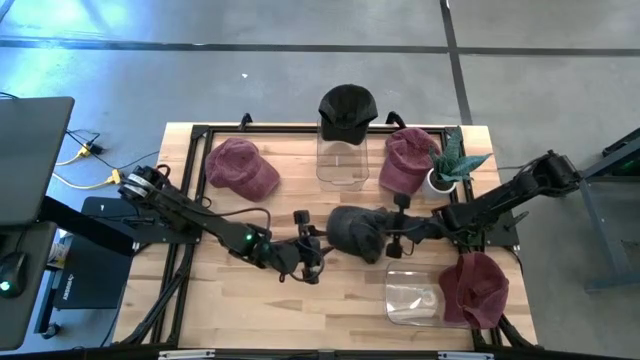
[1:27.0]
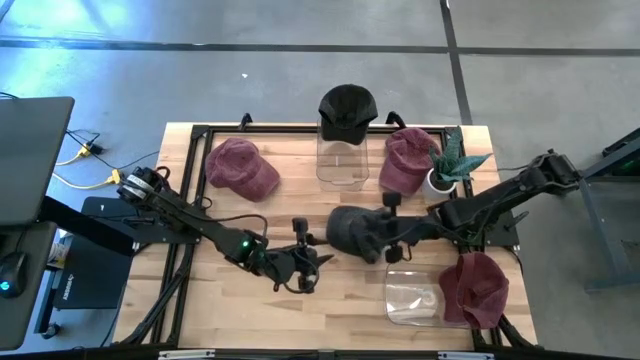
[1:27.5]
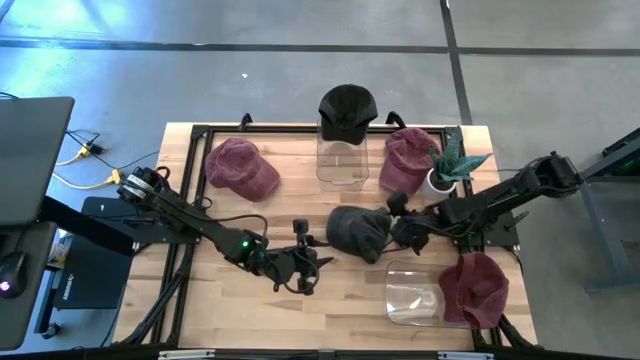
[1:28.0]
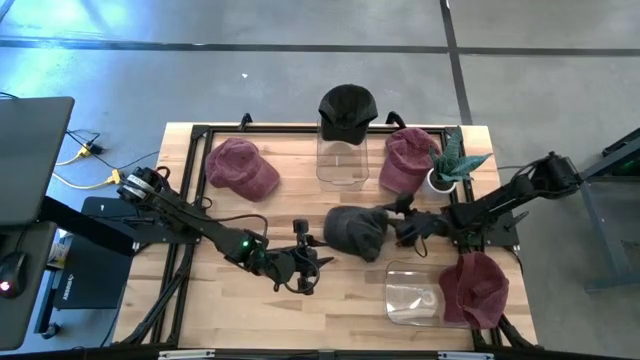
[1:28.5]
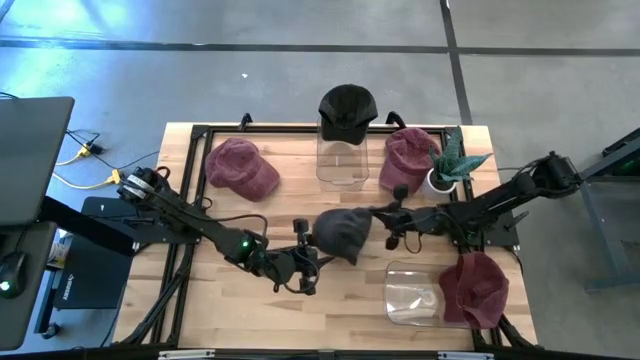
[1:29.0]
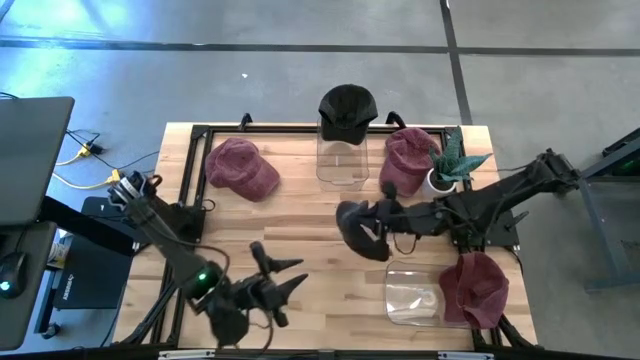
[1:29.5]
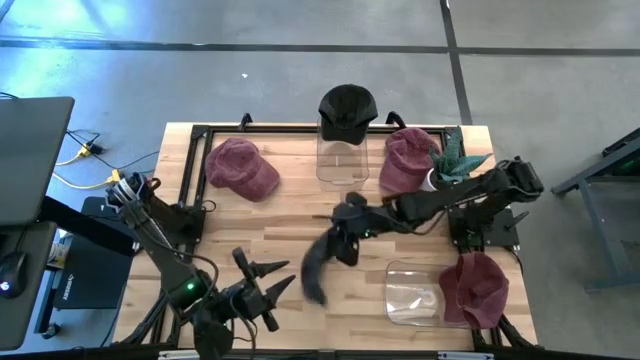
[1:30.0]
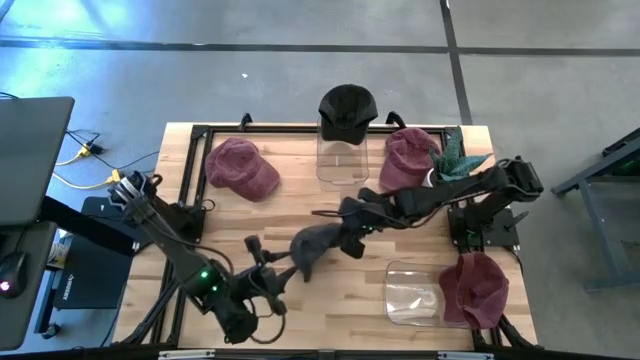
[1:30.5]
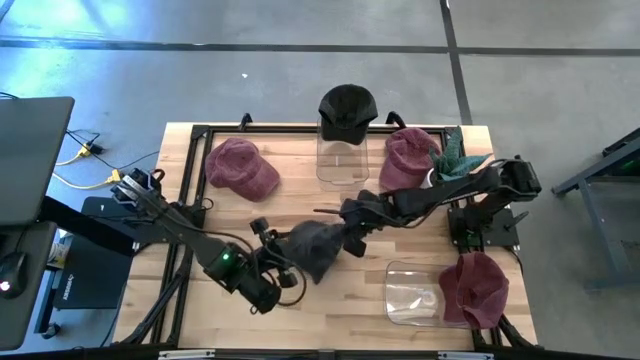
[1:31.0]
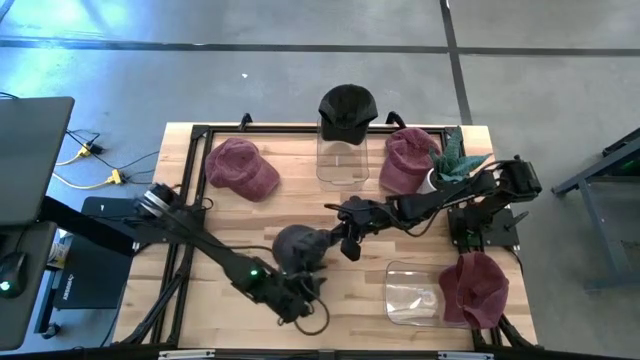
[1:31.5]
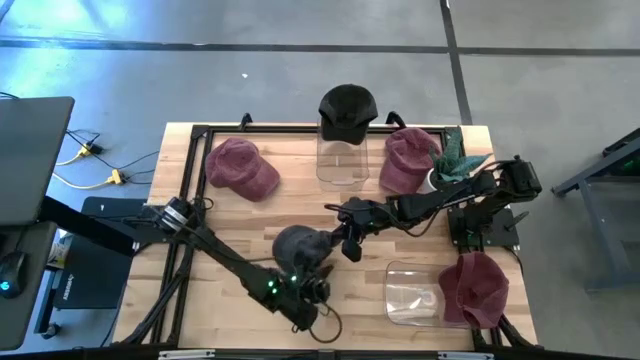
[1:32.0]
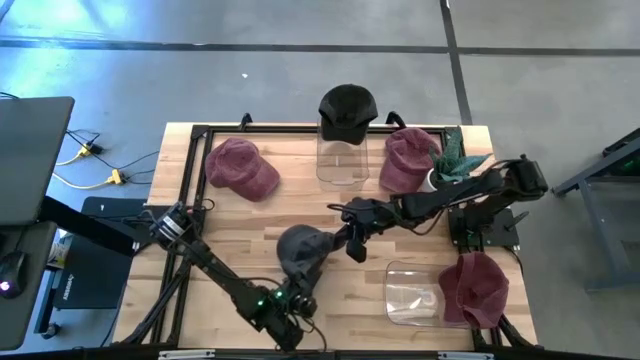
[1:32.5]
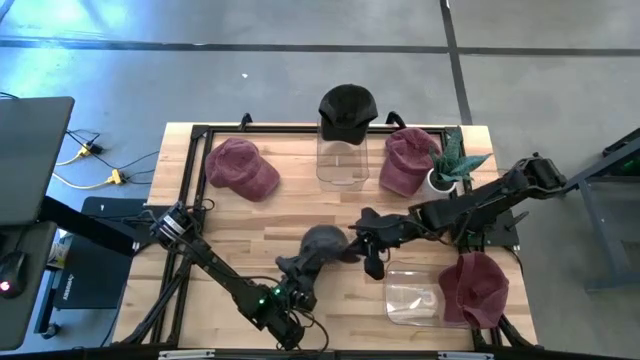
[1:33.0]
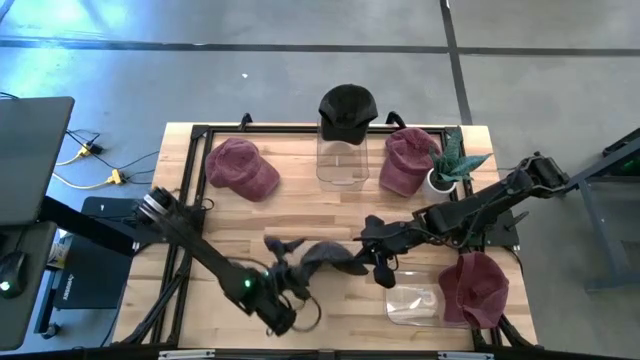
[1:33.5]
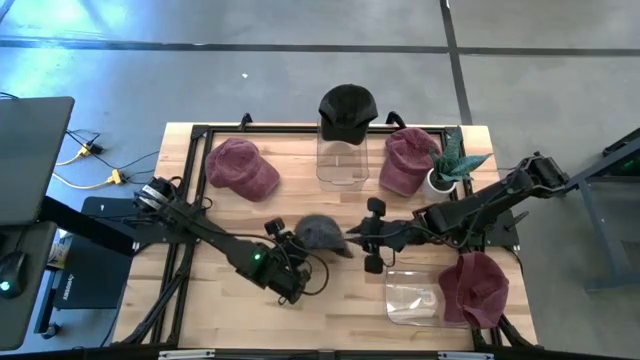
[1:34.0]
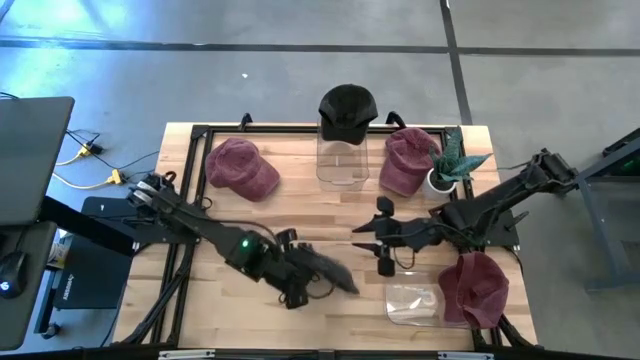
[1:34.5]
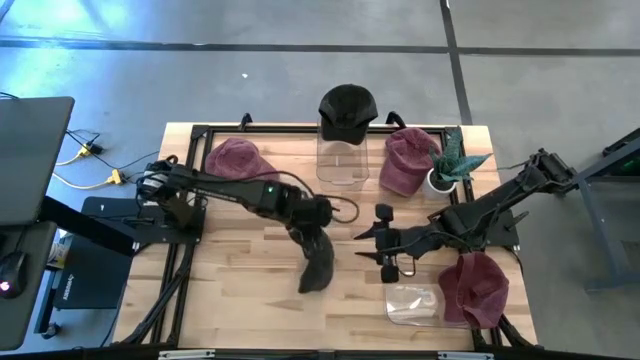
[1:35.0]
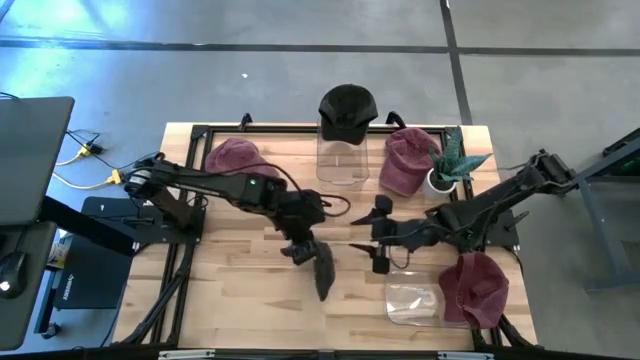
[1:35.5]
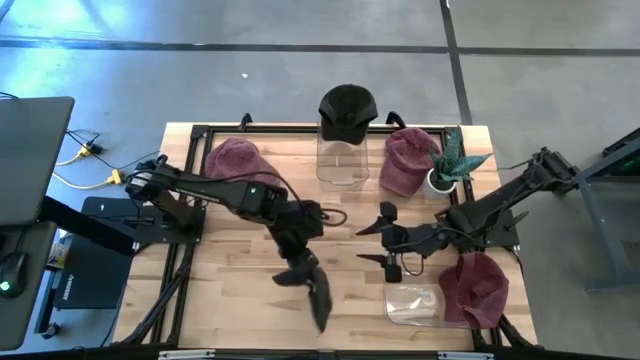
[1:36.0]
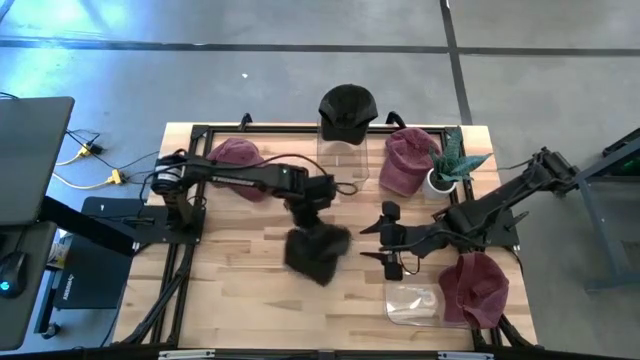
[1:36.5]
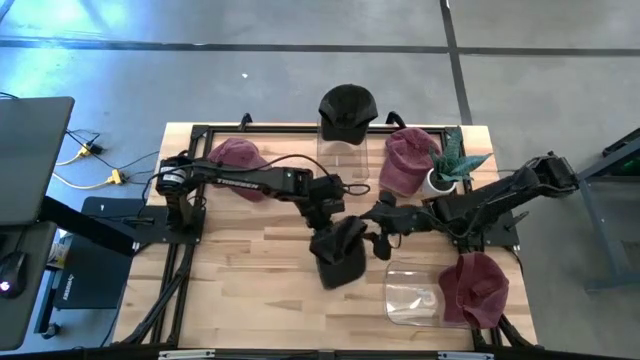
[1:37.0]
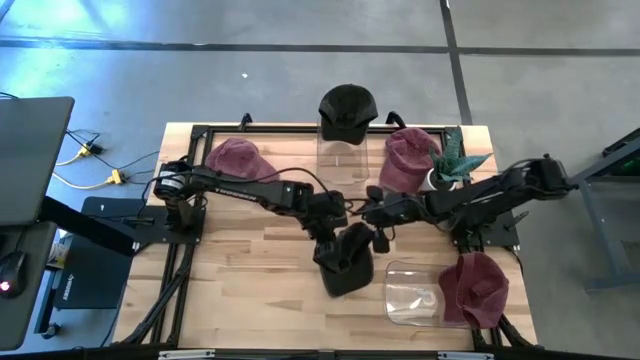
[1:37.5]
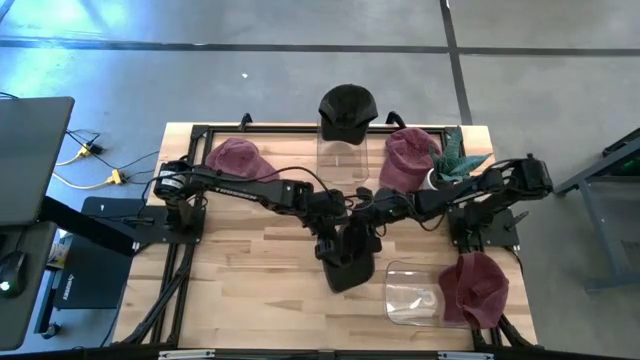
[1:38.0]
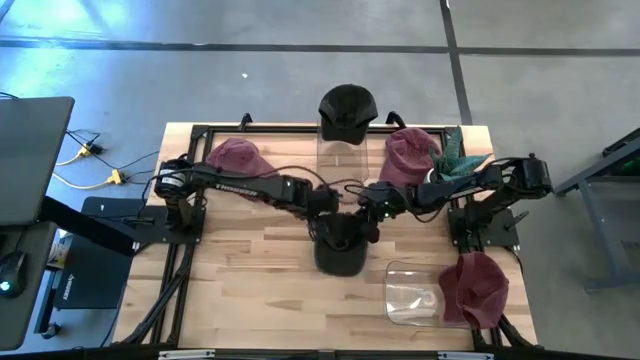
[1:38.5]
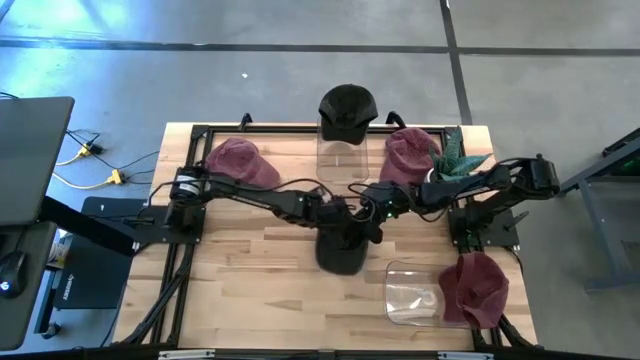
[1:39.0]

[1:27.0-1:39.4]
Task: Pick & Place hat
Put the black cap into the top transparent bin

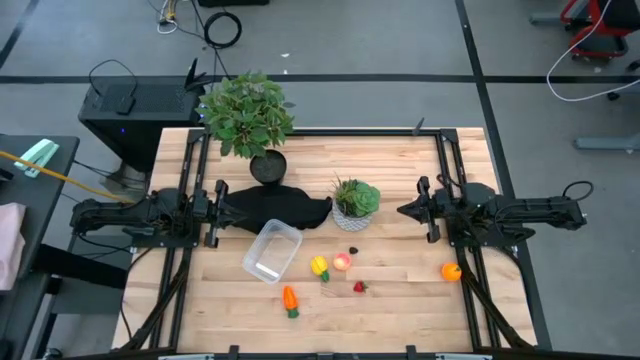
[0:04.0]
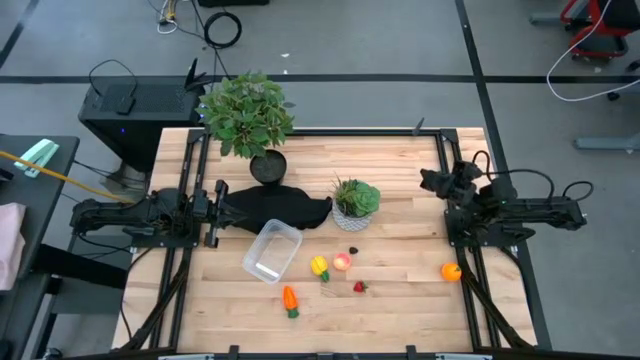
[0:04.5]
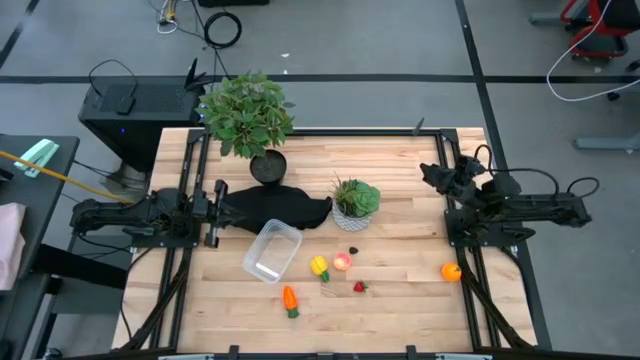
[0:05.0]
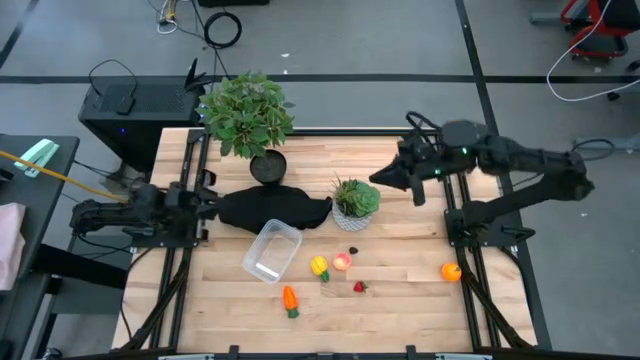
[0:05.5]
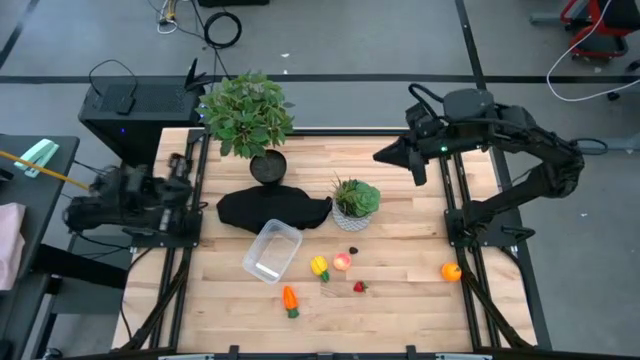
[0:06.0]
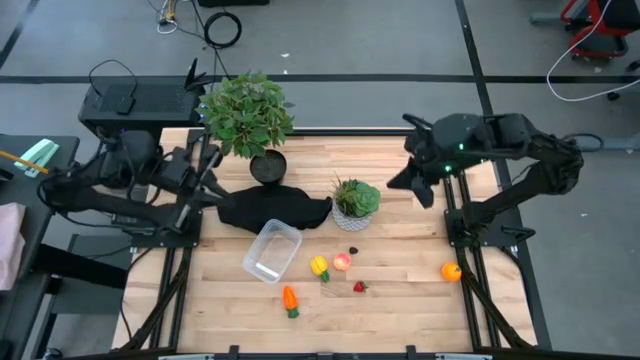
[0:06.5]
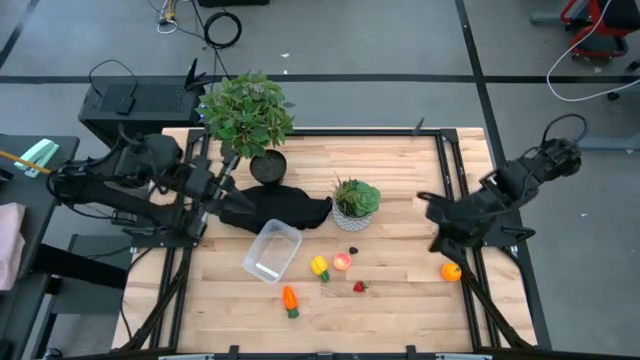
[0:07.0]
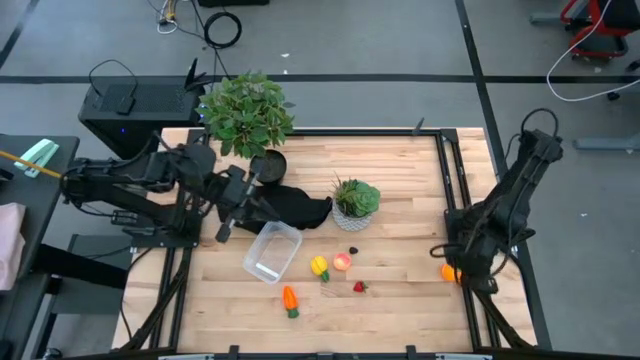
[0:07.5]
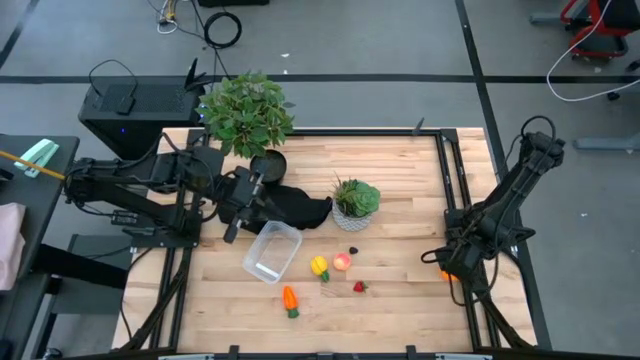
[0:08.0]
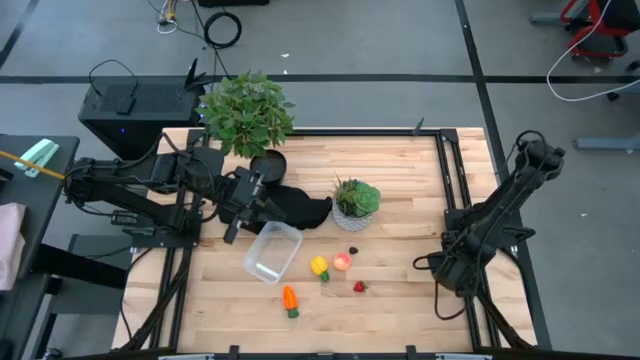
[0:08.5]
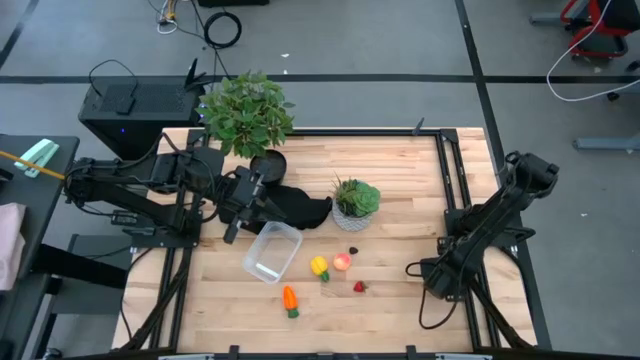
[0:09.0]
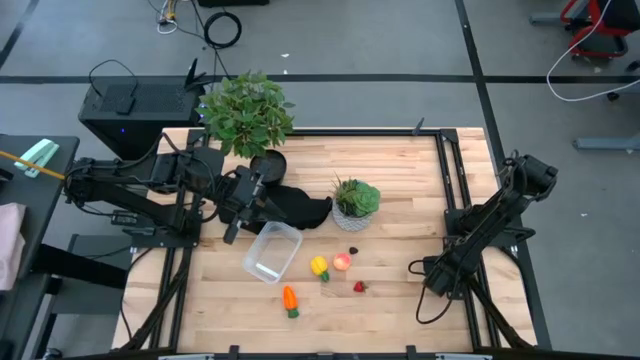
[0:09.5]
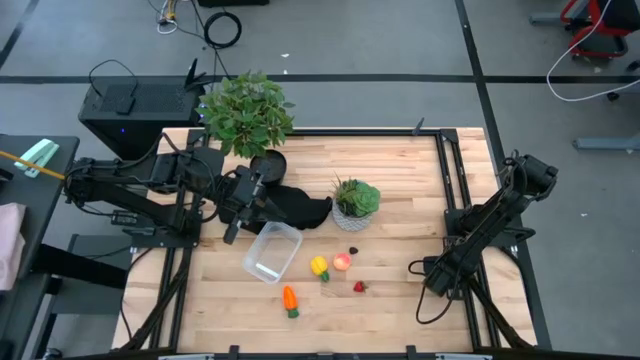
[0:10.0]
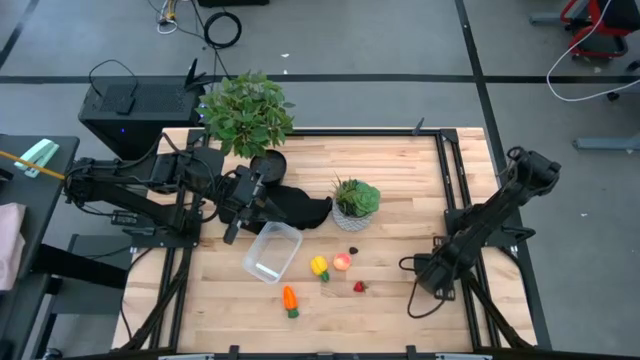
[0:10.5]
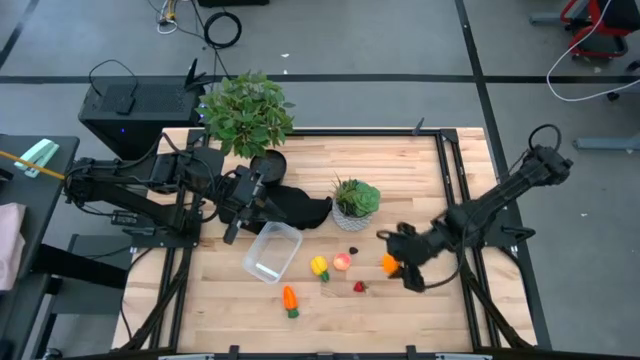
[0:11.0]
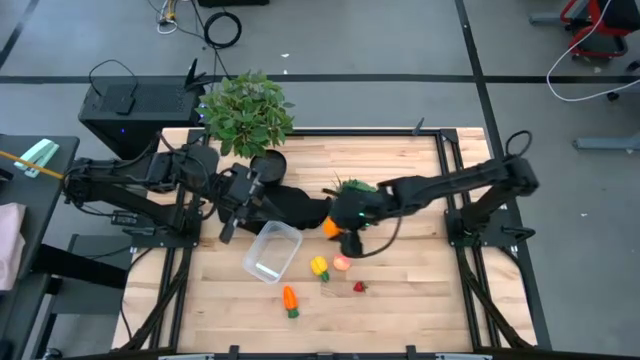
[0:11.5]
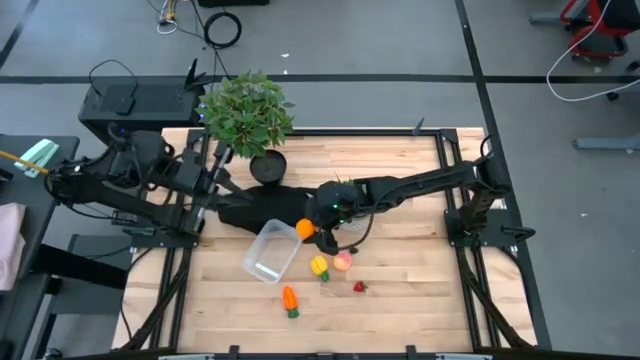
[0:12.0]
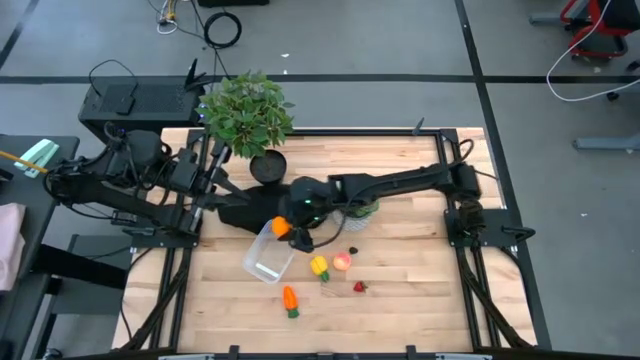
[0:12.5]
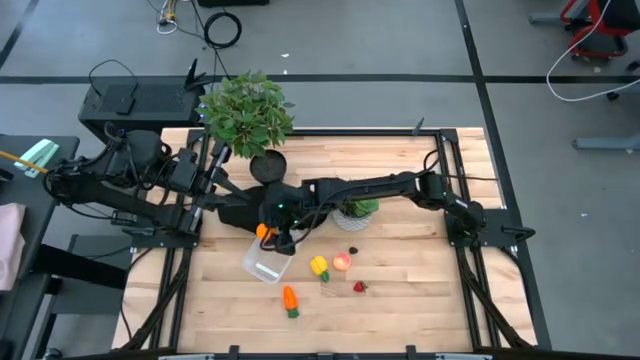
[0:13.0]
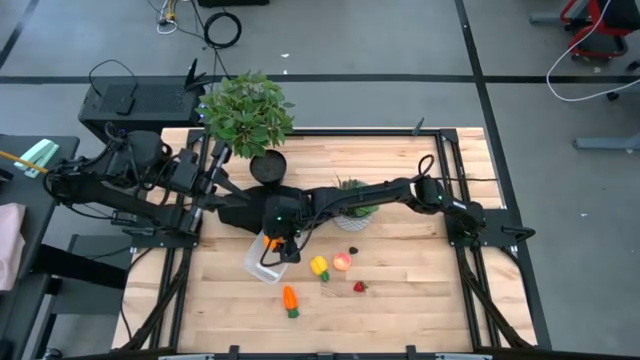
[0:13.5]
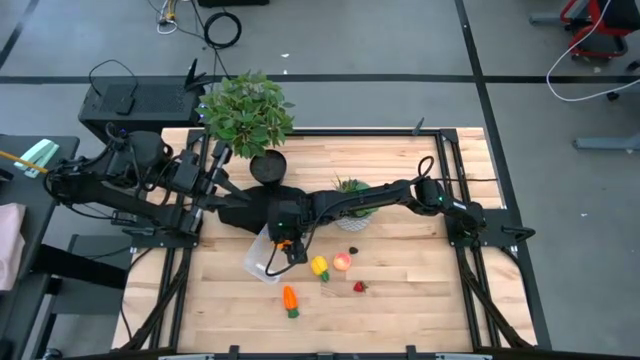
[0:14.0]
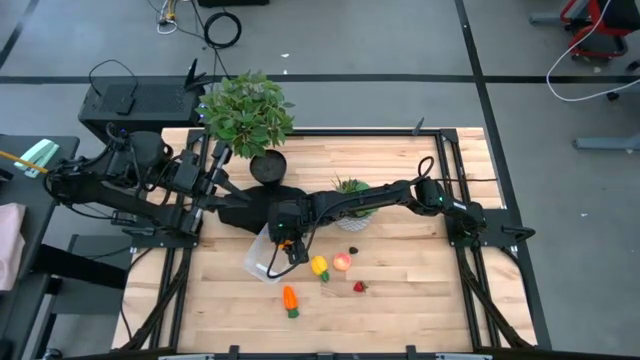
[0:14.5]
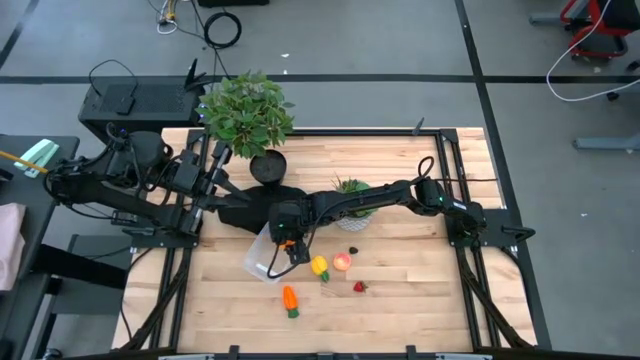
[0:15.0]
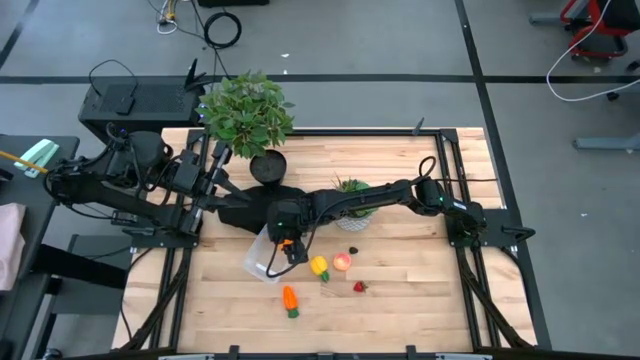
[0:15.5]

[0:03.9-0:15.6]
Task: Pick and placing Produce into tupperware
Put the orange into the transparent bin
